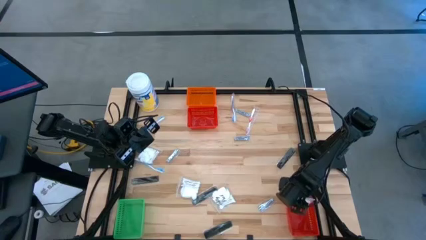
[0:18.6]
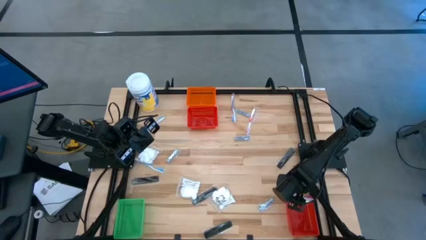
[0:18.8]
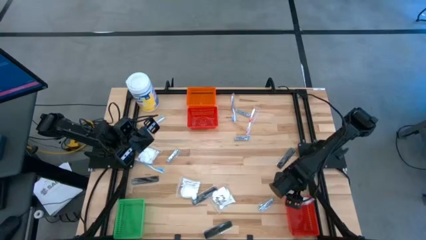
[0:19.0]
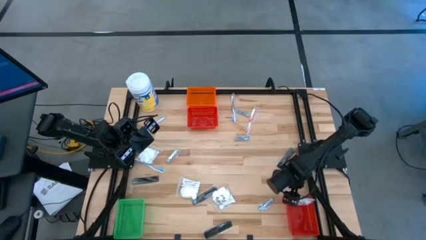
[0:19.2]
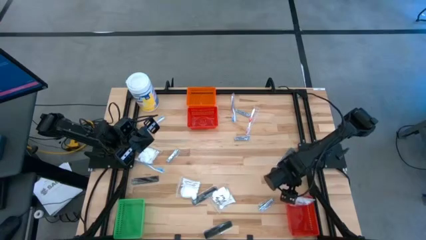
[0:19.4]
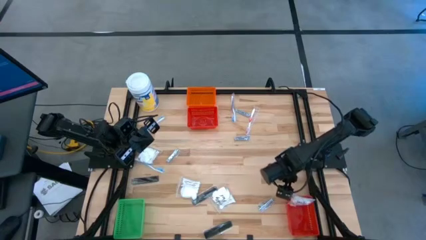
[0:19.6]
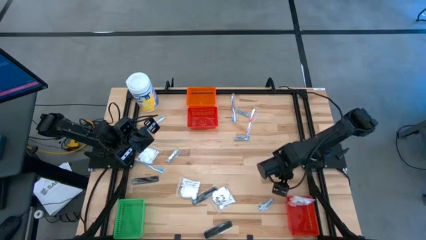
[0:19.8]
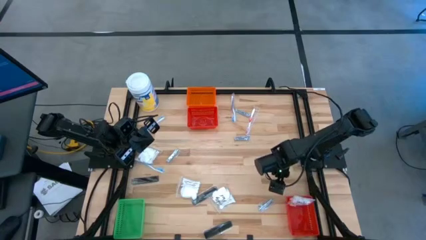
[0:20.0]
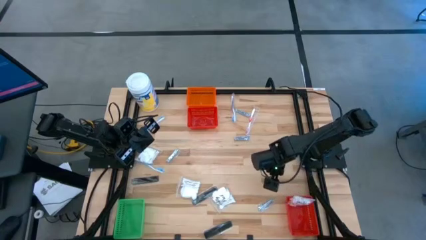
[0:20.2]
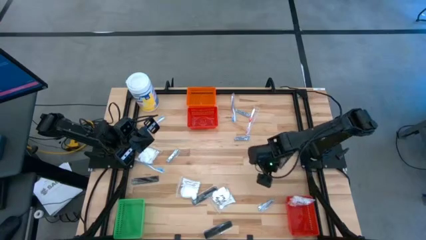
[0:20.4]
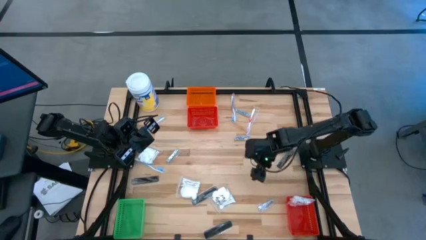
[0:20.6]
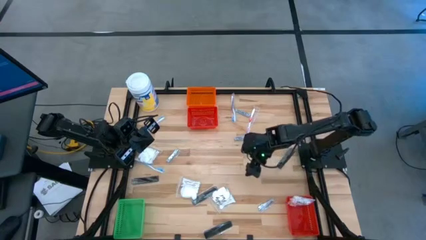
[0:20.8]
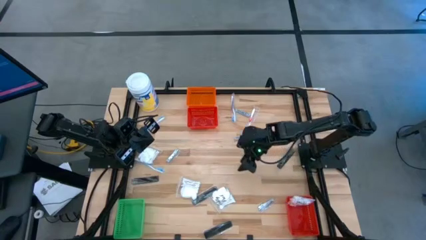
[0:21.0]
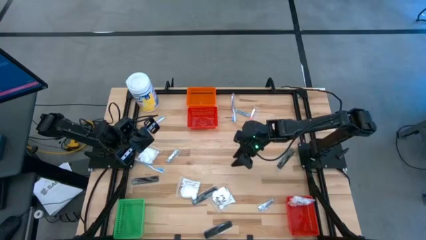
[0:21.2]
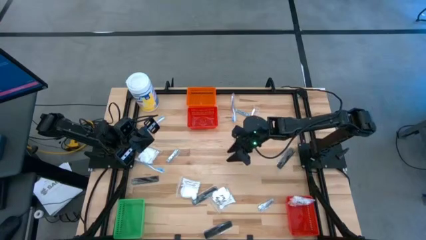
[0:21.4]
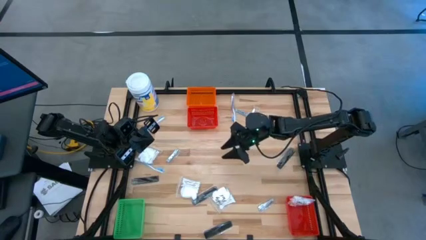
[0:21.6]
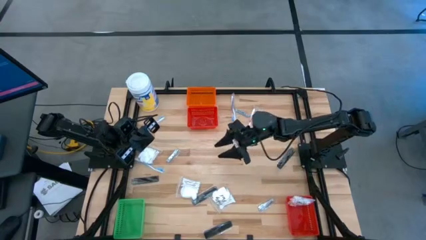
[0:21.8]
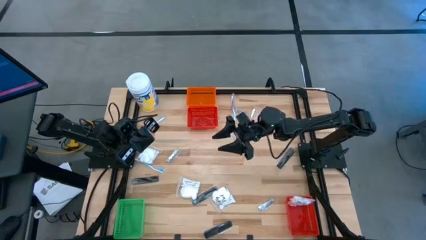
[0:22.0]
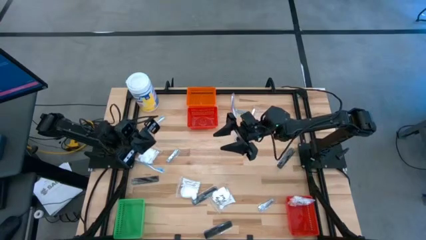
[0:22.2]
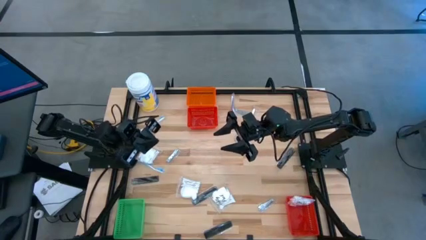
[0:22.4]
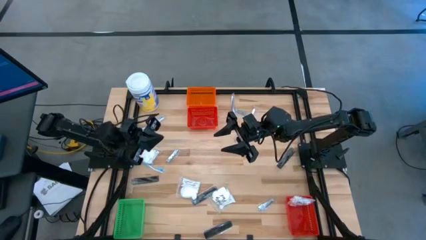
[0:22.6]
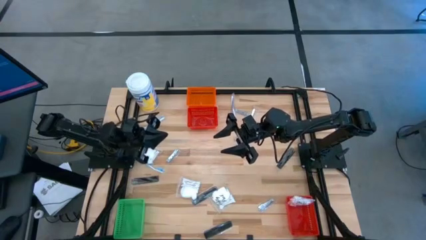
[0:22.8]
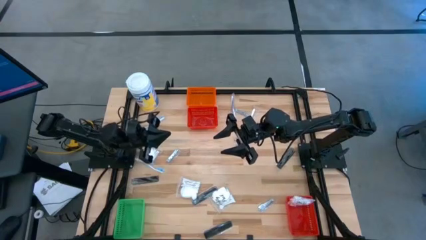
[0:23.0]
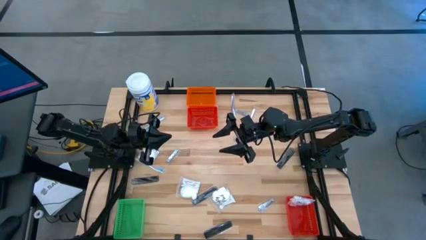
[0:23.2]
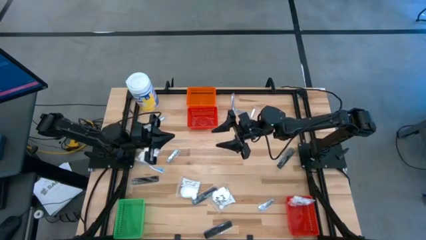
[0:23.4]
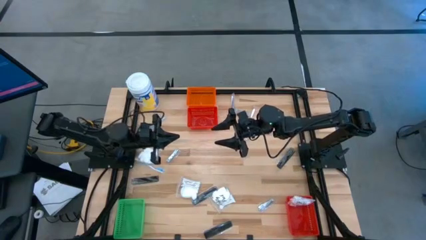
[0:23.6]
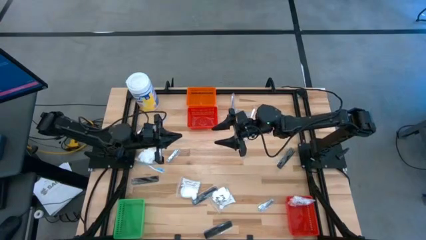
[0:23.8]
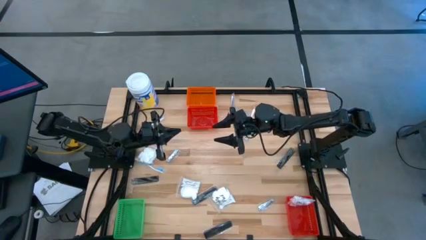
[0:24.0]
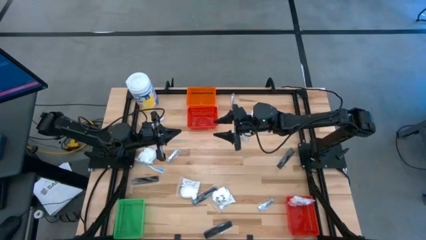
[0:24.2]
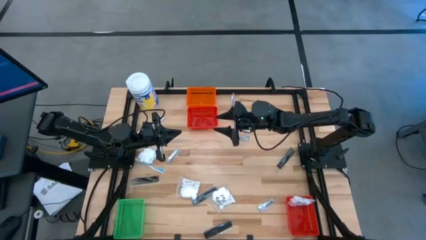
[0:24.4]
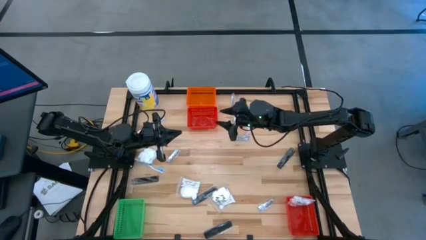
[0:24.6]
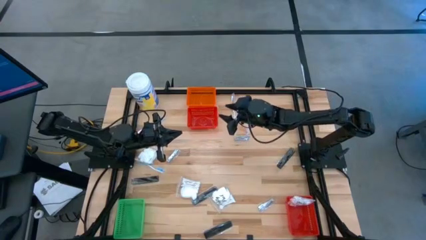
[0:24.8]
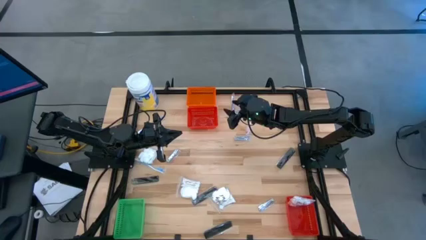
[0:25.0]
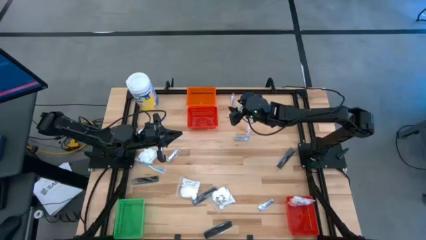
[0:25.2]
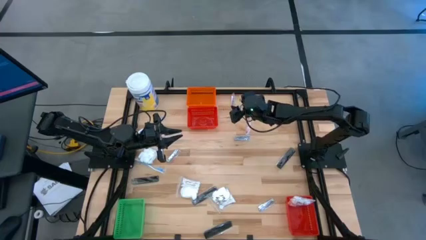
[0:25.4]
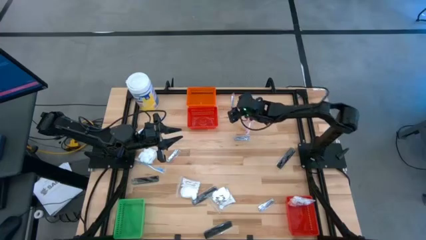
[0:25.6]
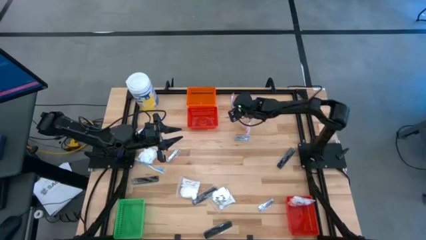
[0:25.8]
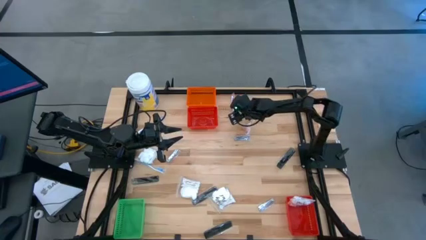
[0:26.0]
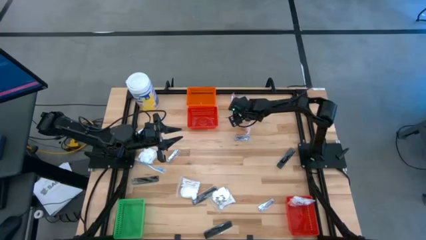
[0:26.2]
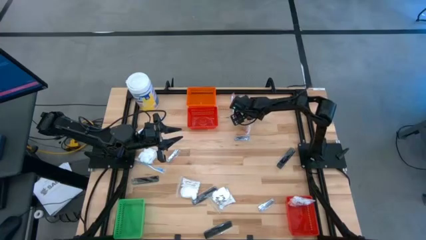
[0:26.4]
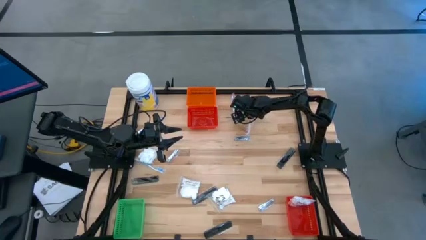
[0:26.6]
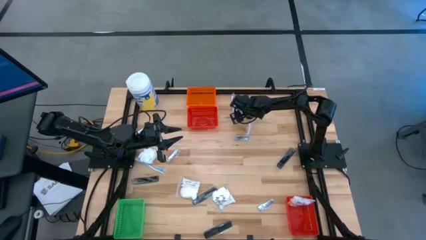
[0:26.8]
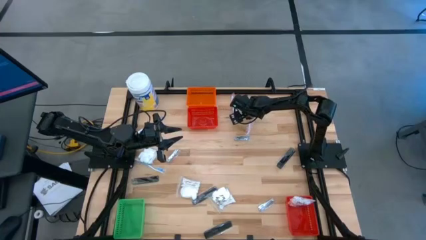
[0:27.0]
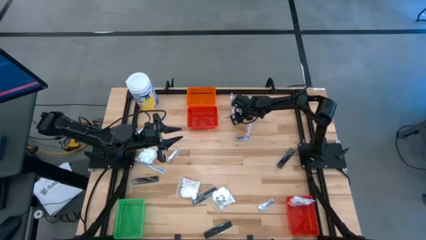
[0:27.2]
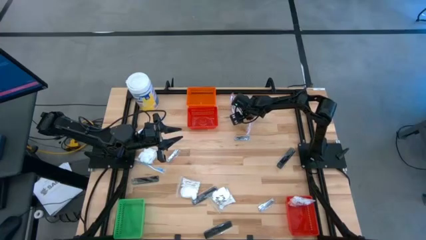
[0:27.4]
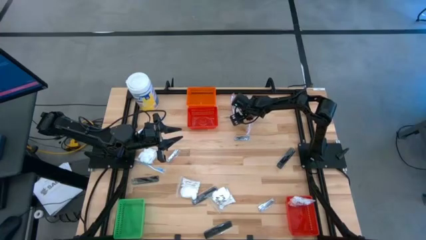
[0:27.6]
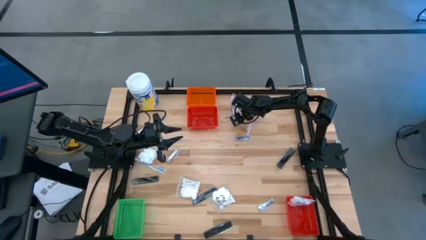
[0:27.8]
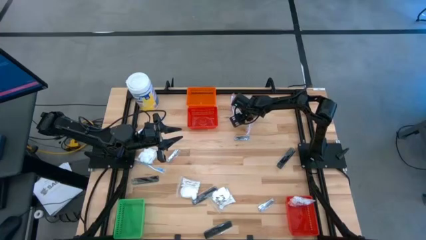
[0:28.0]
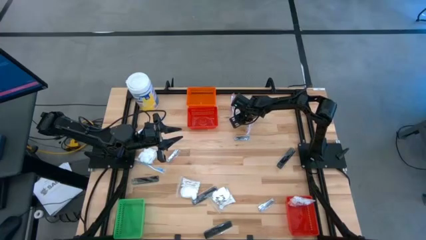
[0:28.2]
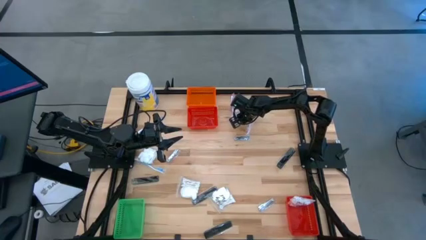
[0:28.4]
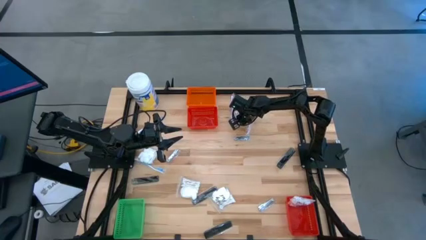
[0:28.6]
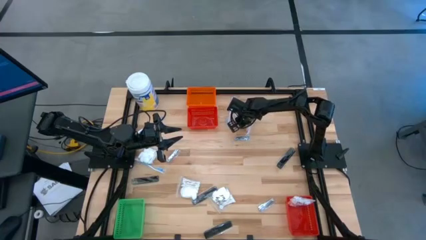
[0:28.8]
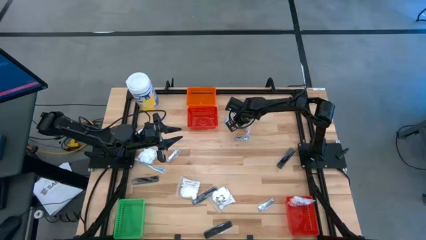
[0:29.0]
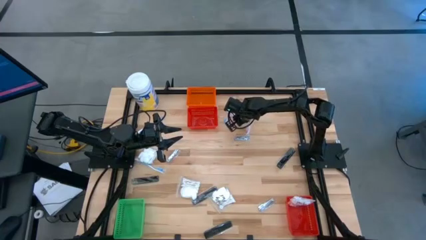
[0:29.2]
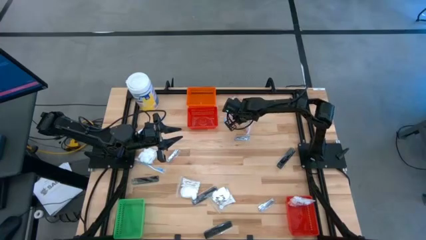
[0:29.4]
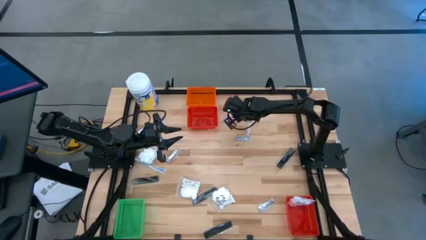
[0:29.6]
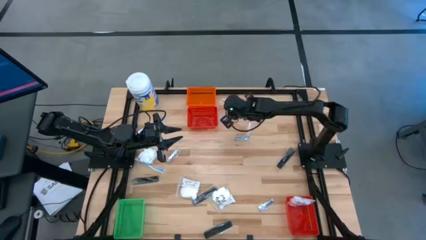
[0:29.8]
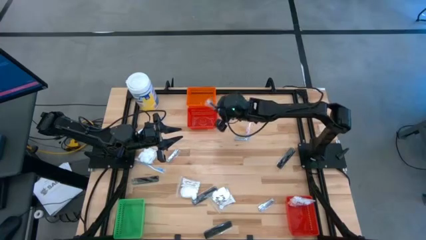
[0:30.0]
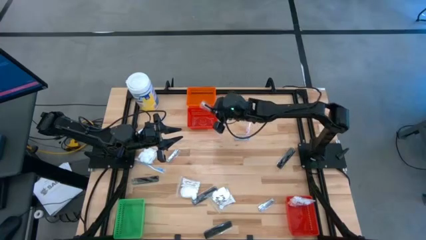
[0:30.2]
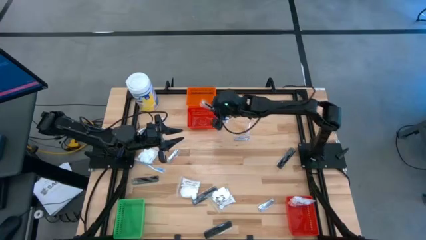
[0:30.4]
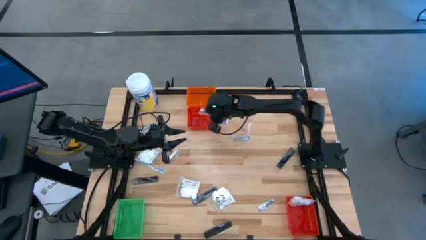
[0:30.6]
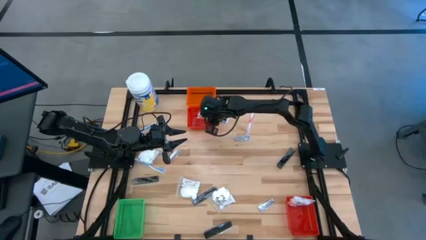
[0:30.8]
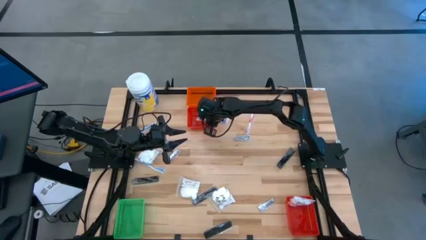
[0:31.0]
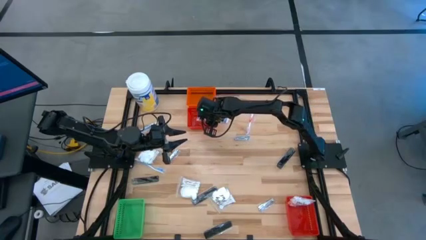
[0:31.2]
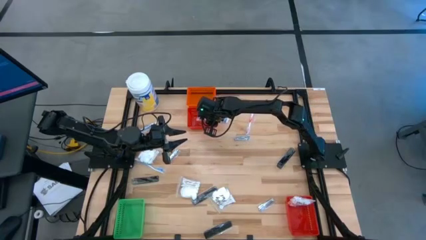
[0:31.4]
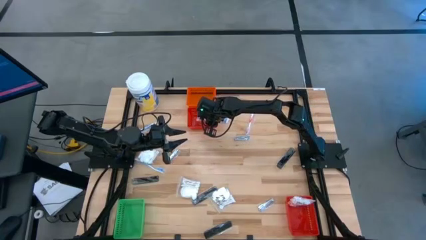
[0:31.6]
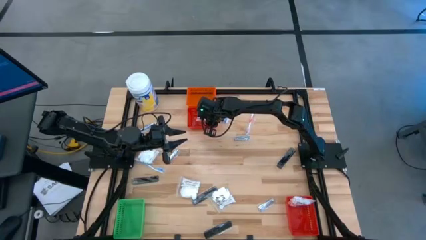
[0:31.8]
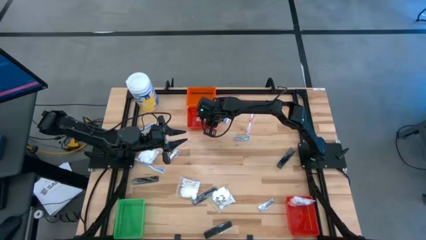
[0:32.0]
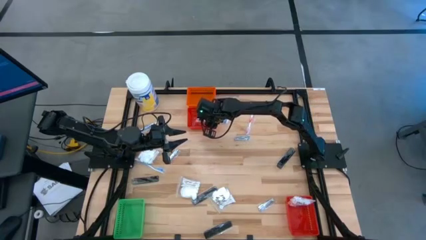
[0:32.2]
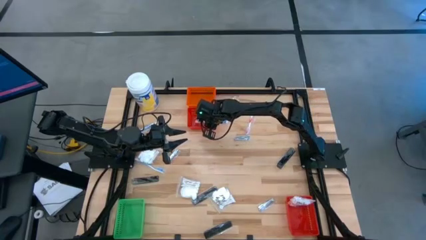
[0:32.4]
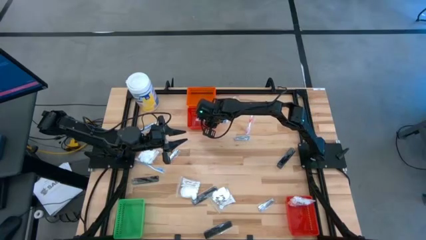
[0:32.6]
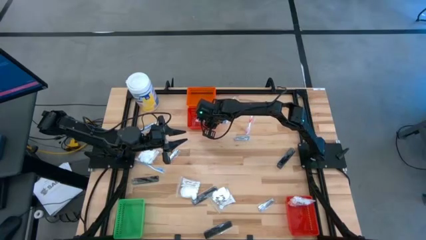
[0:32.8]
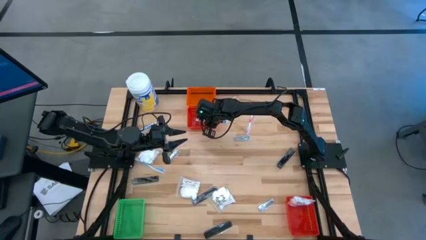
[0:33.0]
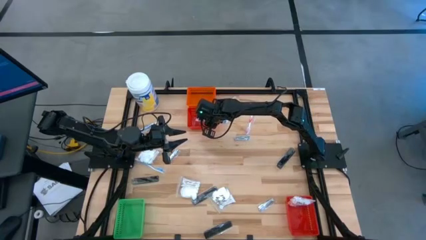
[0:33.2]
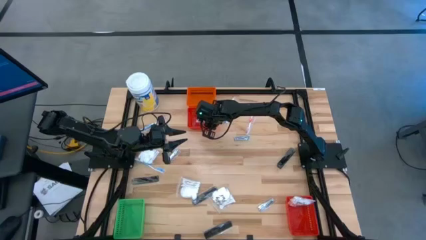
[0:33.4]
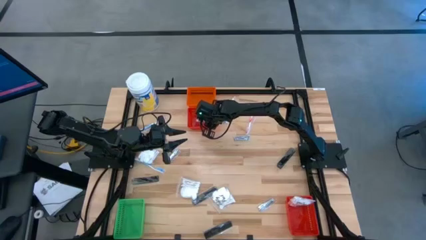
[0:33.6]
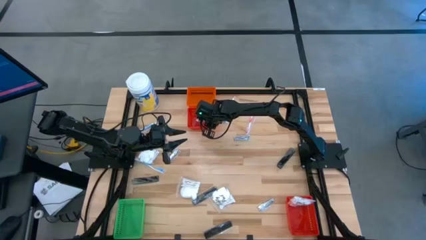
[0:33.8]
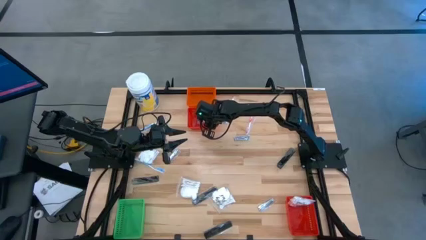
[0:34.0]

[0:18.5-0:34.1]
Task: Pick & Place Travel size toiletries
Put the nail cutter into the top red basket
